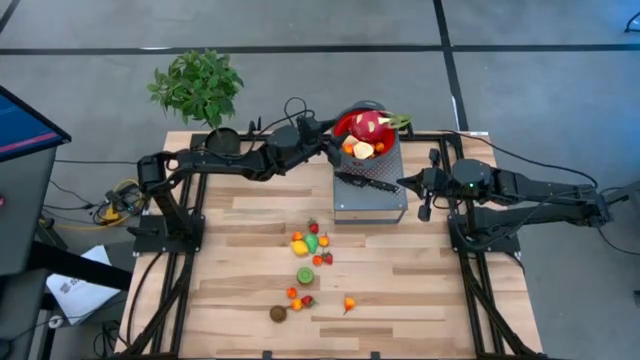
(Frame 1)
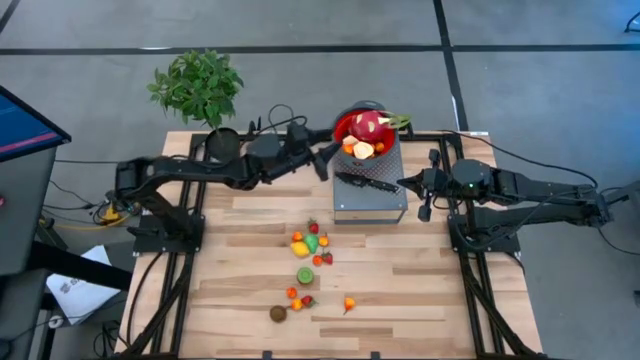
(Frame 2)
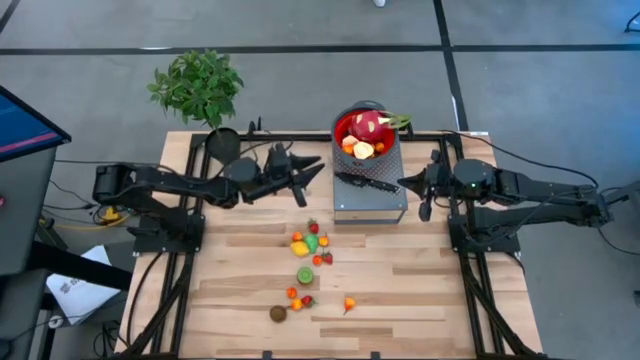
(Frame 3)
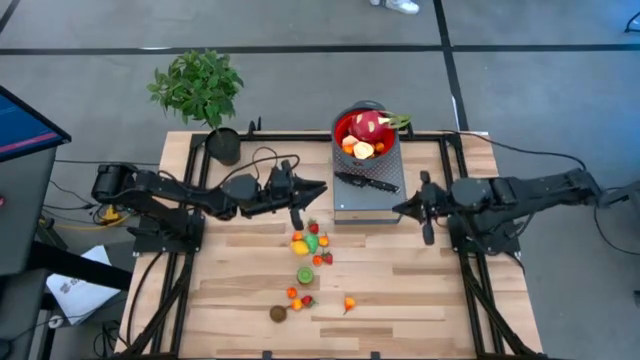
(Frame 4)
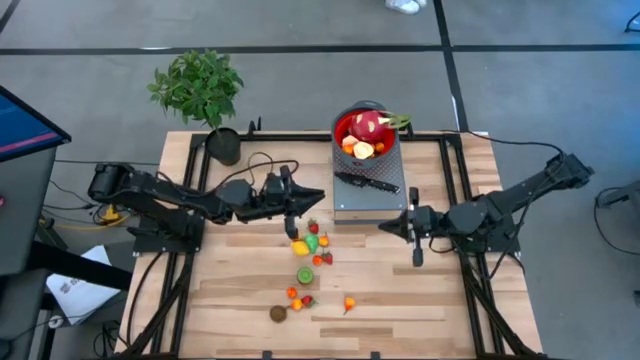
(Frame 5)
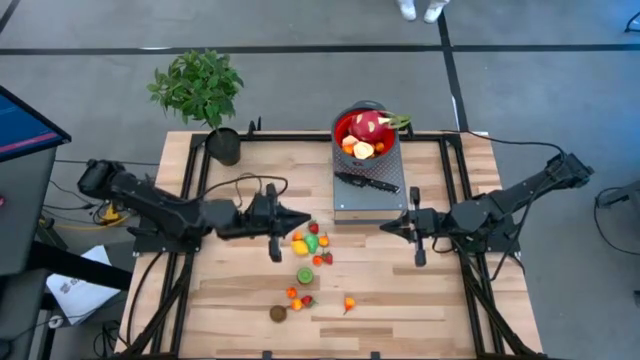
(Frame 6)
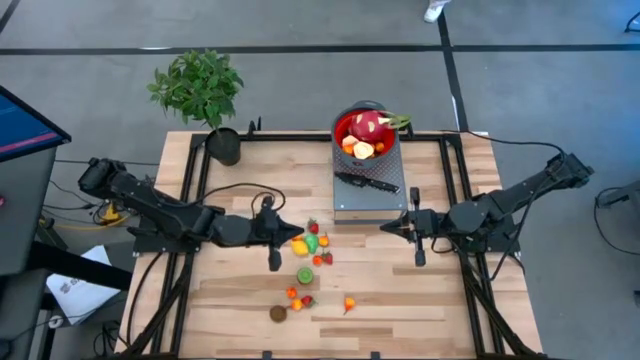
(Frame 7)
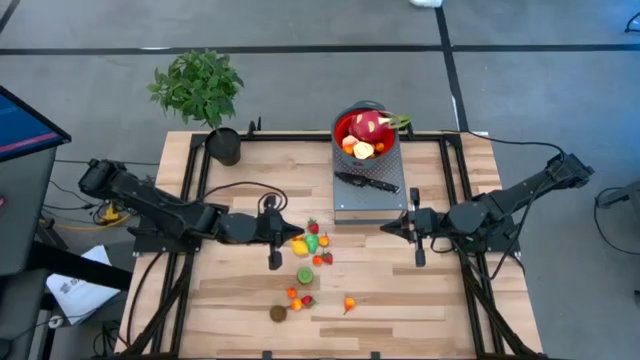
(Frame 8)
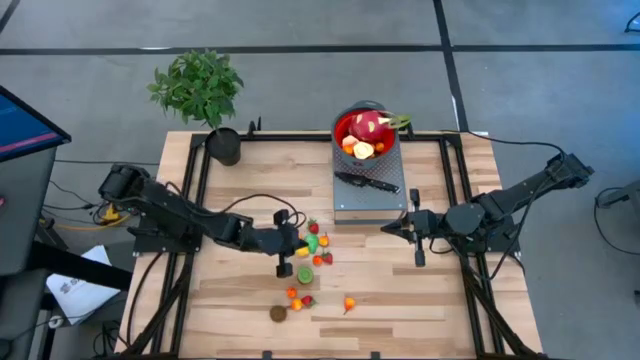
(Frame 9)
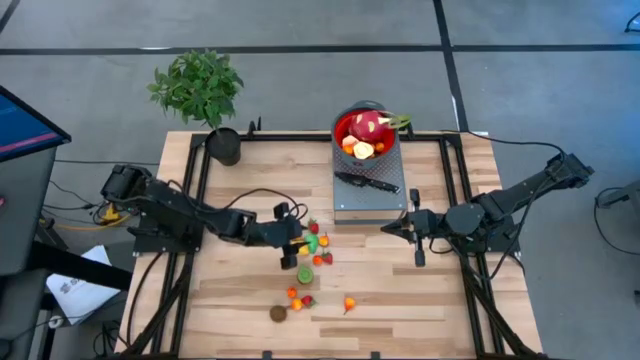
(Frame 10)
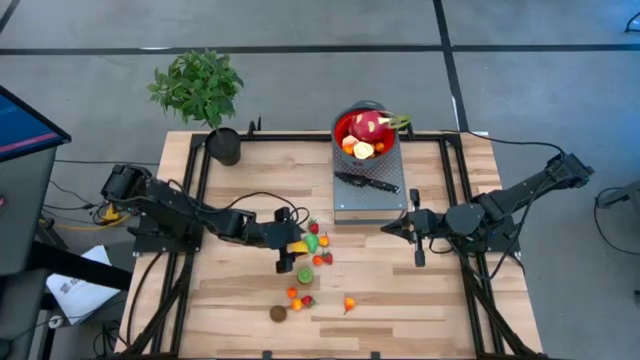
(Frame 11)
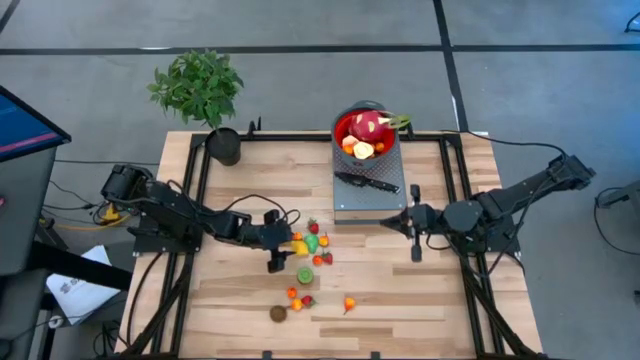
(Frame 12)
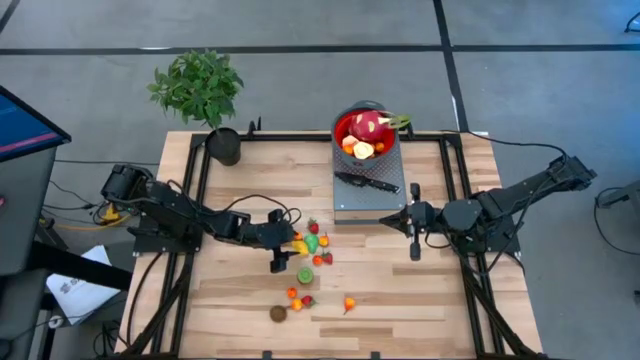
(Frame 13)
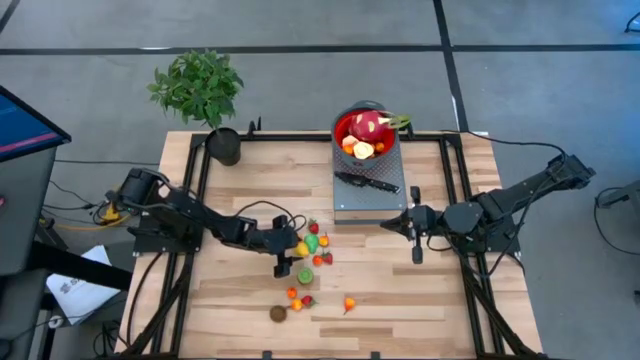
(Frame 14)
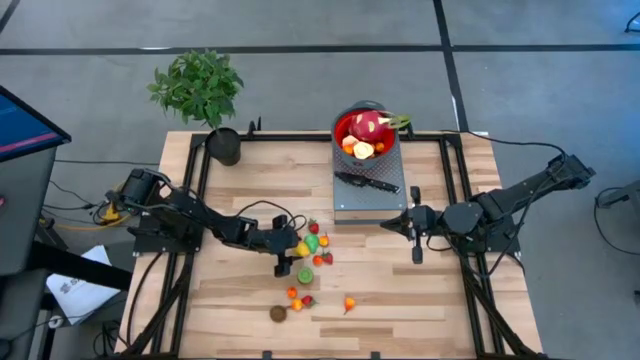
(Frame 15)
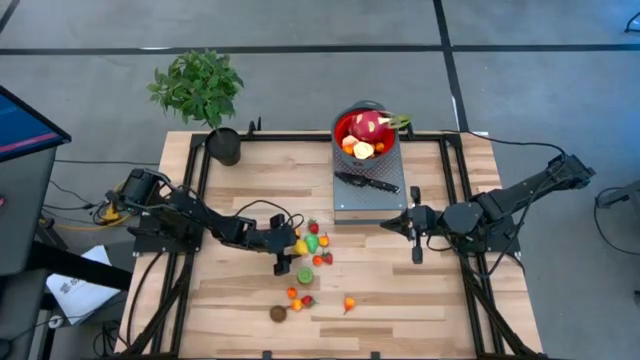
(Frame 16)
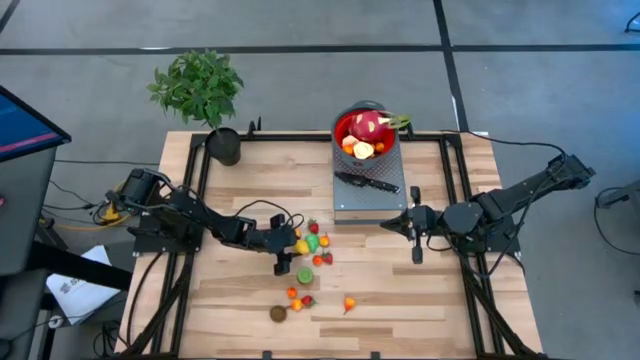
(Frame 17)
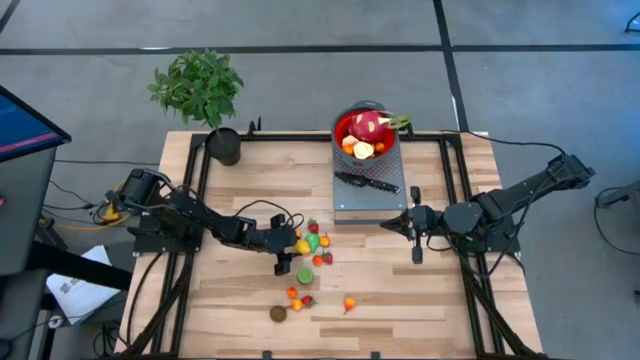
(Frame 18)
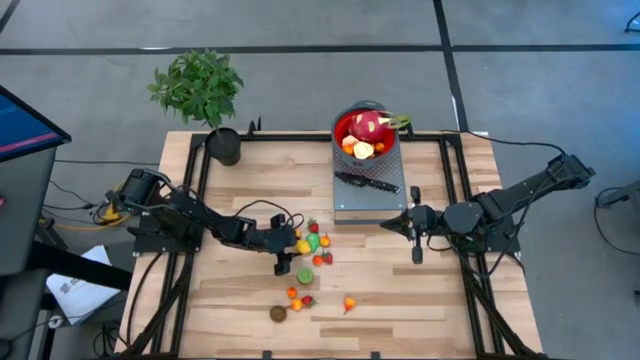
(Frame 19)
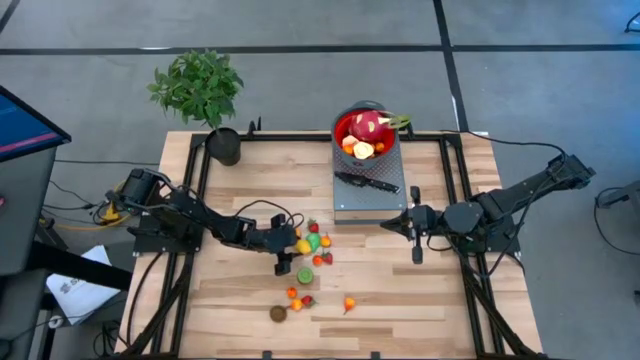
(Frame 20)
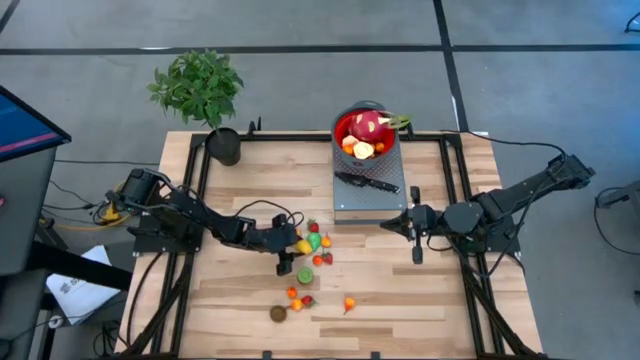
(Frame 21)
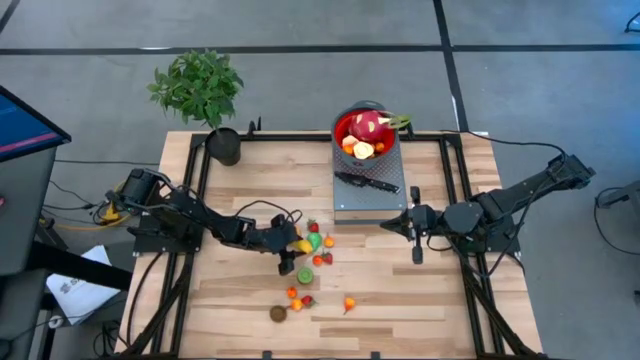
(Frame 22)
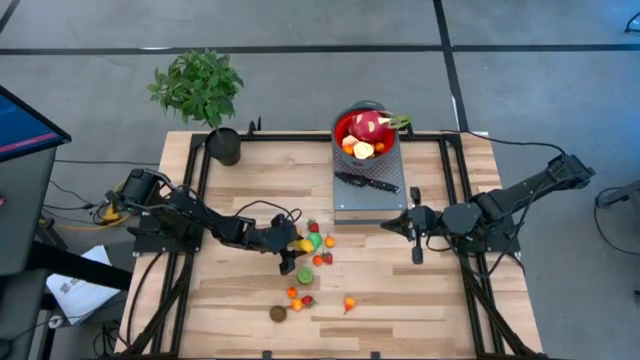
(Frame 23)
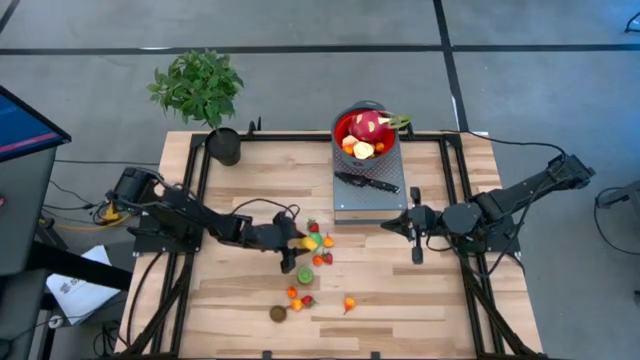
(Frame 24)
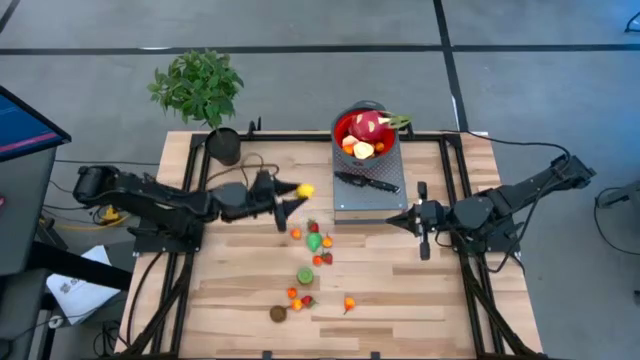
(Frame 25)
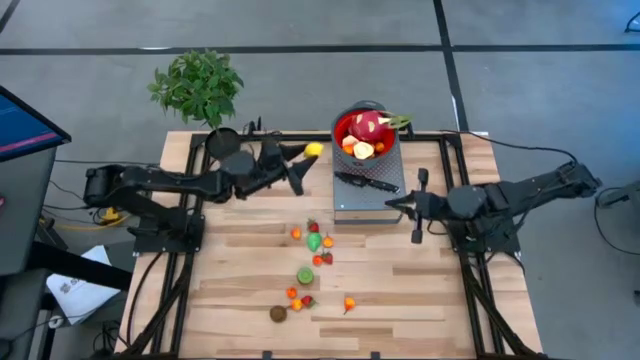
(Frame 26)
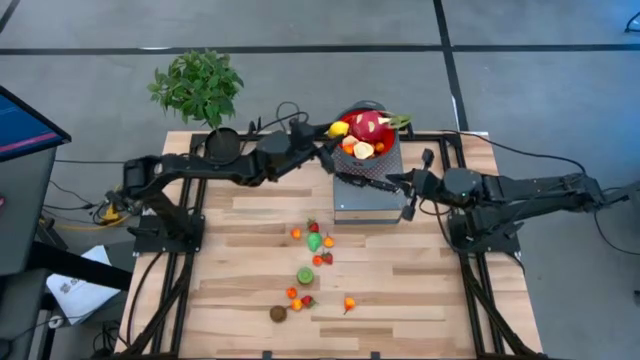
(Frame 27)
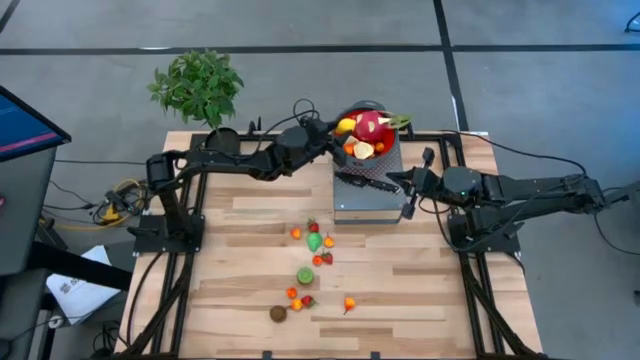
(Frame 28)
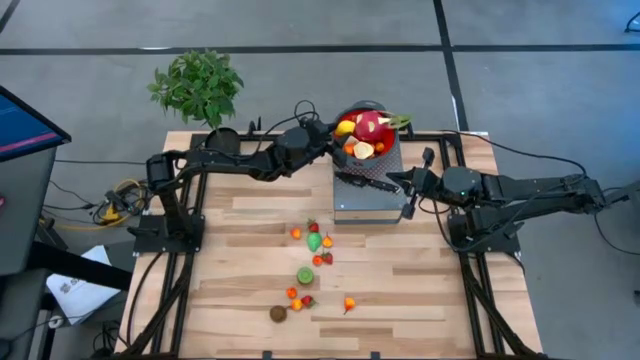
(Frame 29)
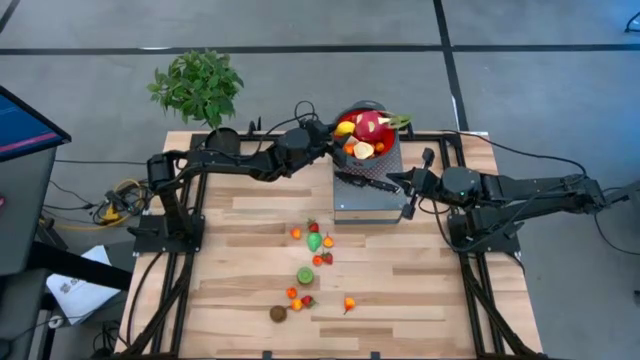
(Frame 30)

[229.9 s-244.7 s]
Task: Pick & Place Fruit
Put the lemon into the red colander on the shelf

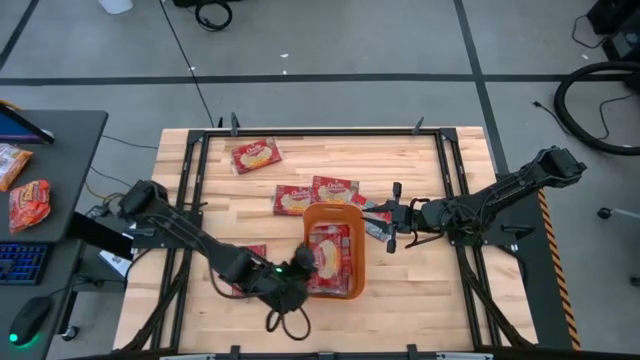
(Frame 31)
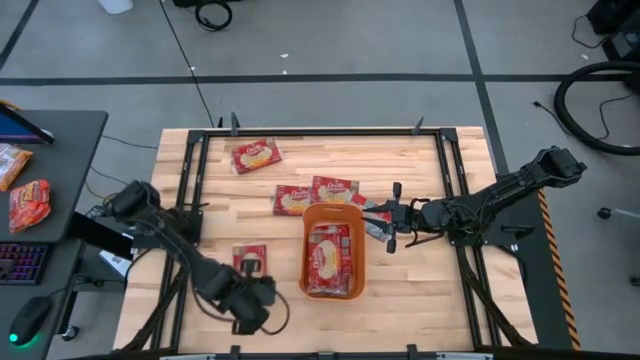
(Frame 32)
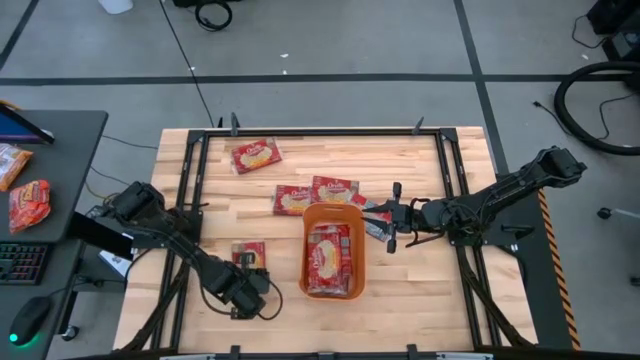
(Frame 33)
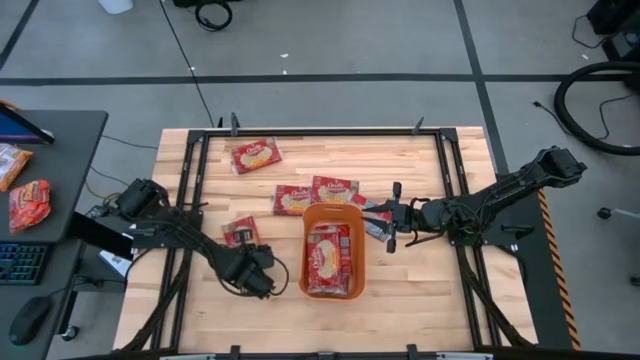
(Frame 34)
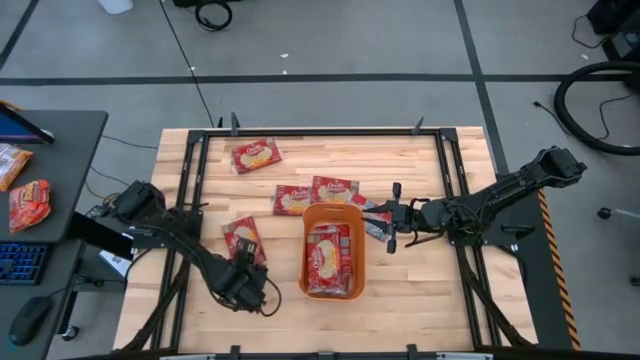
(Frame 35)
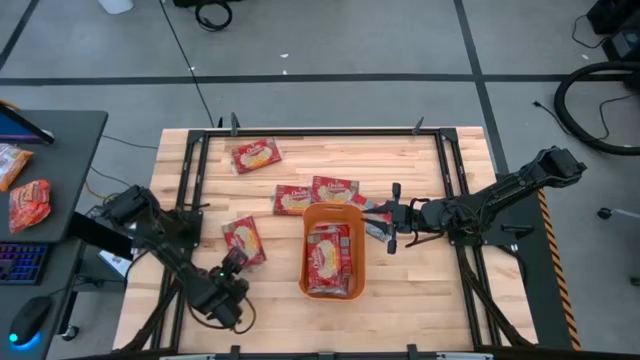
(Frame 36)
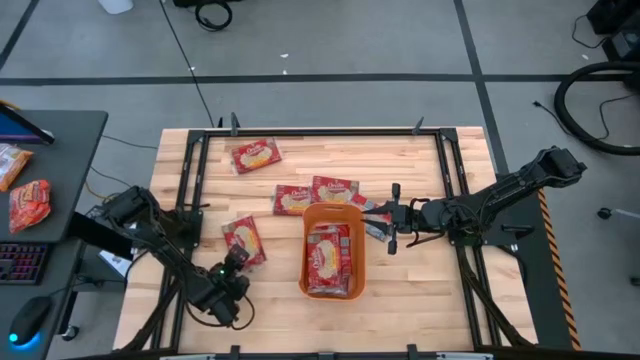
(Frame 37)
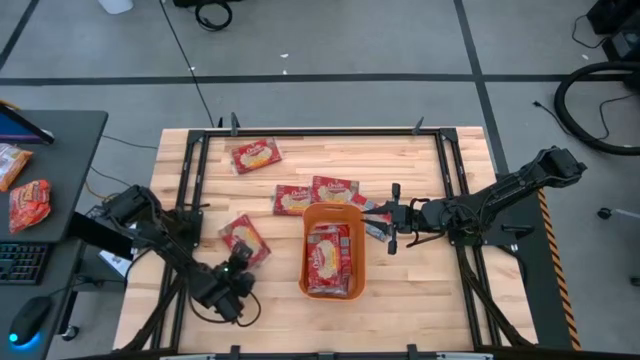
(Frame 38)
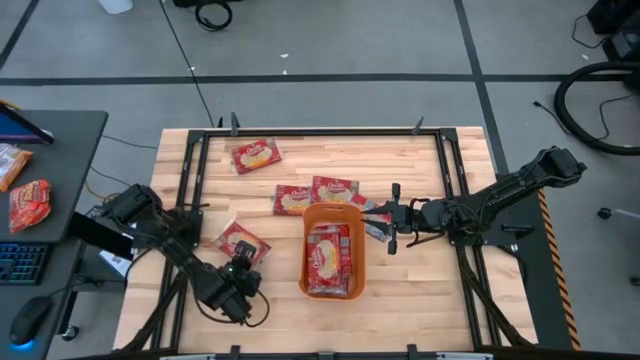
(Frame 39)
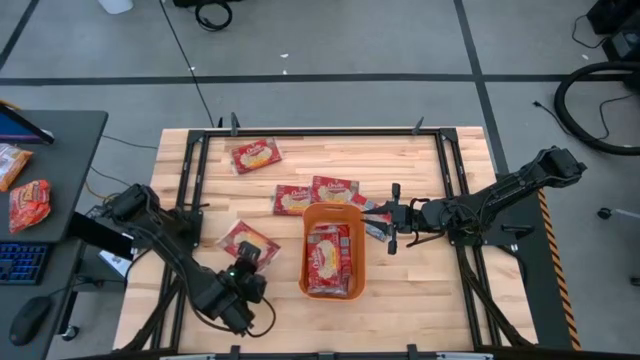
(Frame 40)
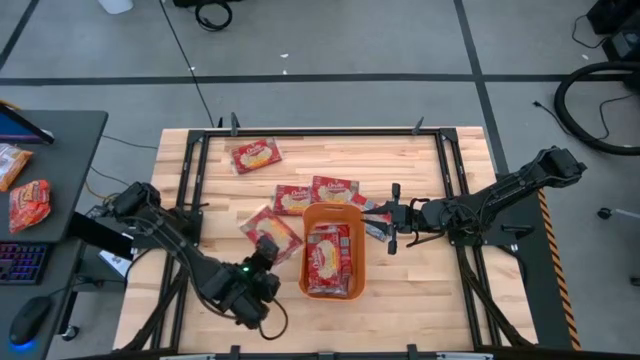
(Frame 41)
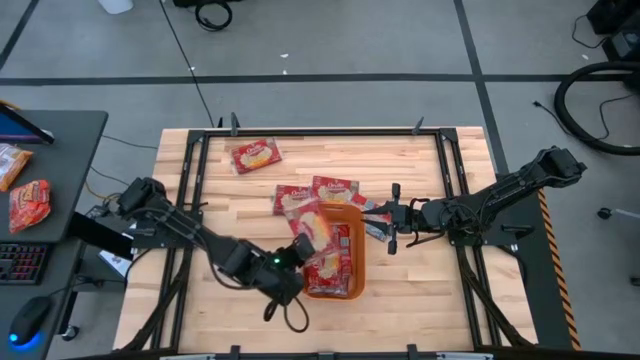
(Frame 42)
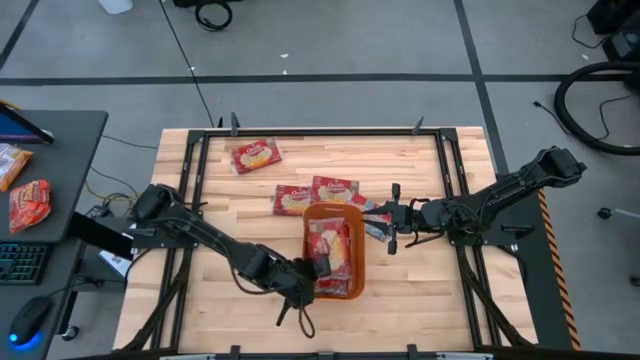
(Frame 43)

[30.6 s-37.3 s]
Task: Sort popcorn bags into baskets
Put the red popcorn bag into the orange bin
